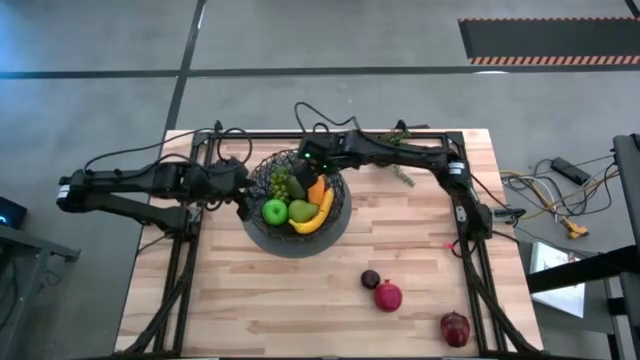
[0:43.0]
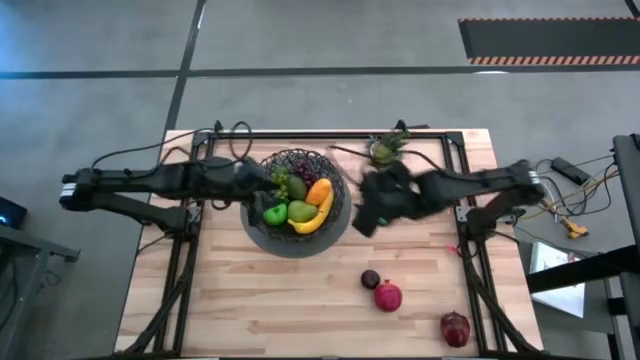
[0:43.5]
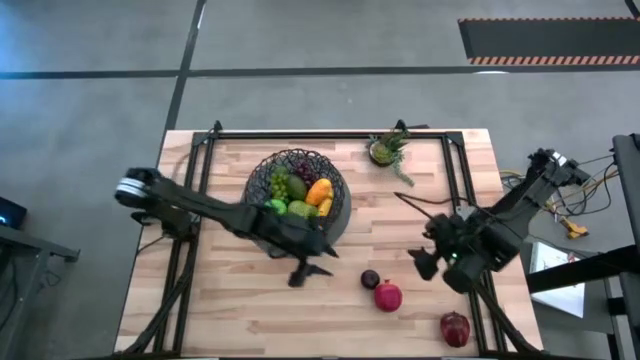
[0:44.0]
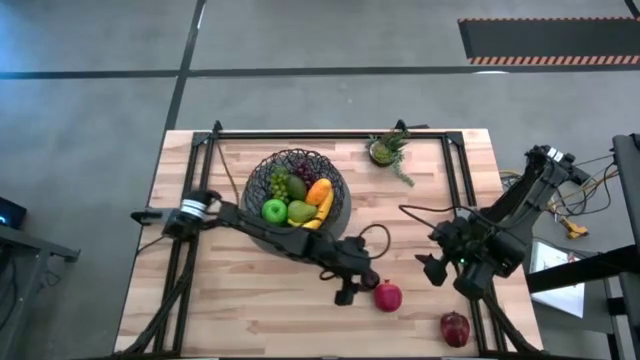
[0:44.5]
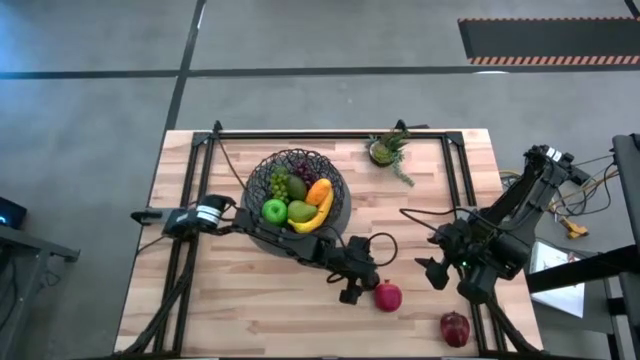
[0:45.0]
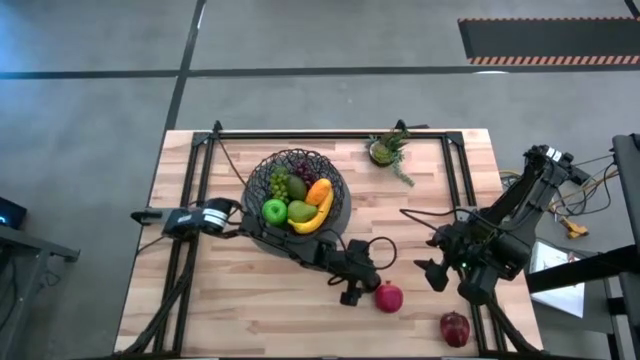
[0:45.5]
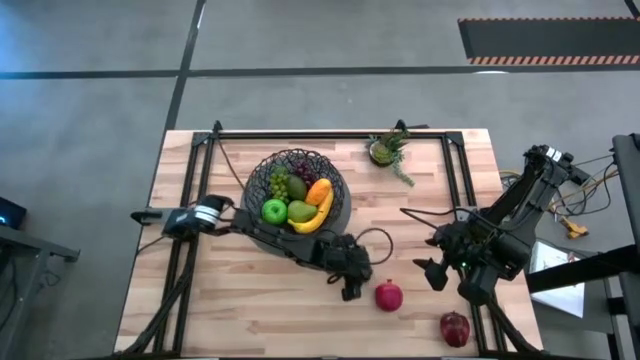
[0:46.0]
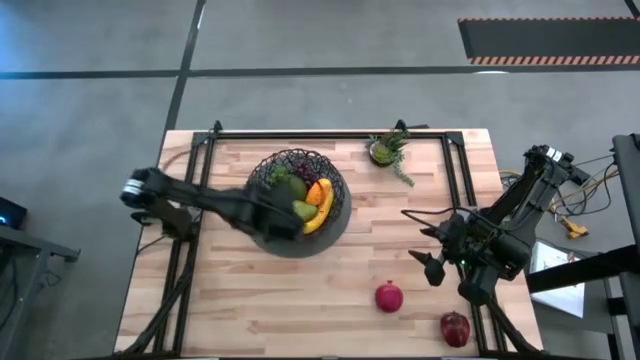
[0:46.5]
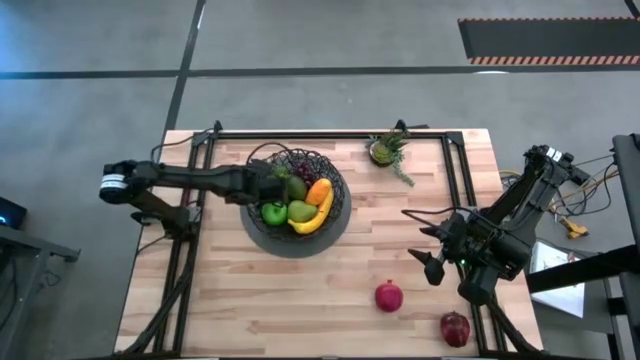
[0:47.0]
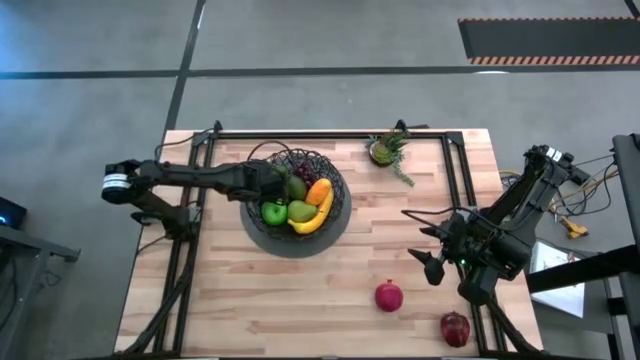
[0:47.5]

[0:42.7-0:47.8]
Task: Build produce basket
Put the plum into the basket

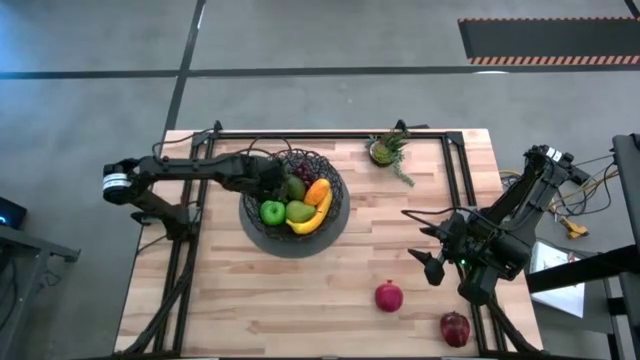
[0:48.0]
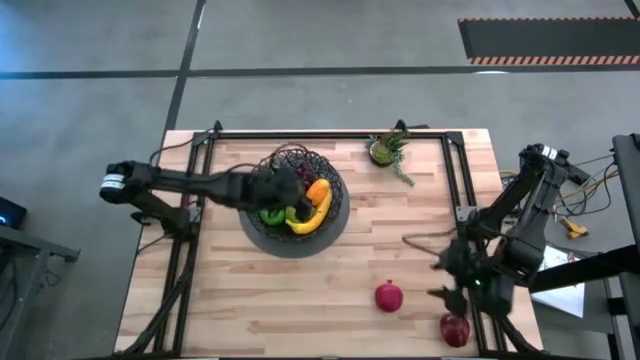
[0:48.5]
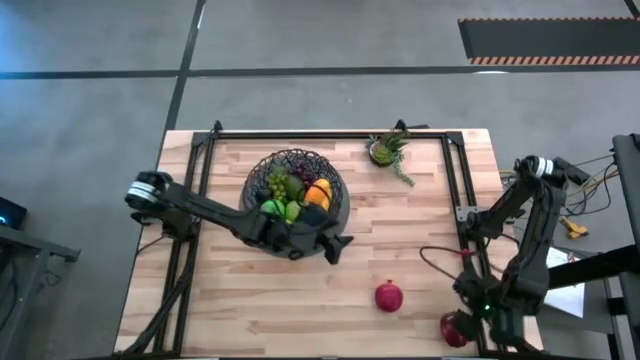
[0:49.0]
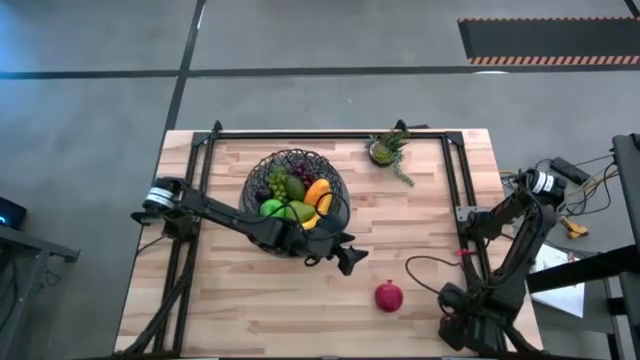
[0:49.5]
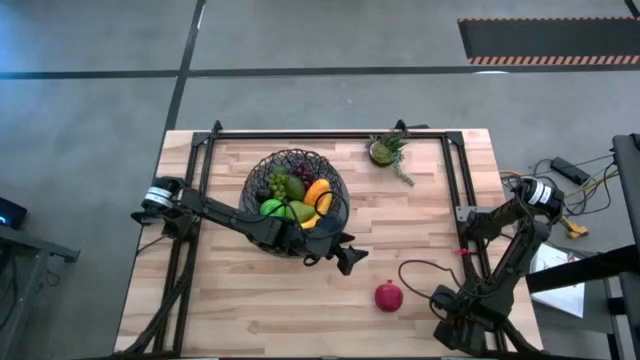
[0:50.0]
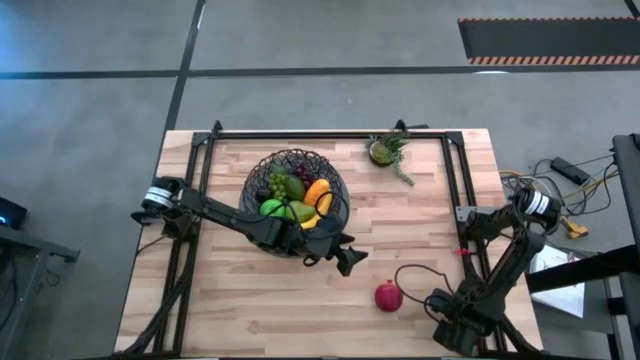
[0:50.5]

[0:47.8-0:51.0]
Put the red apple into the basket

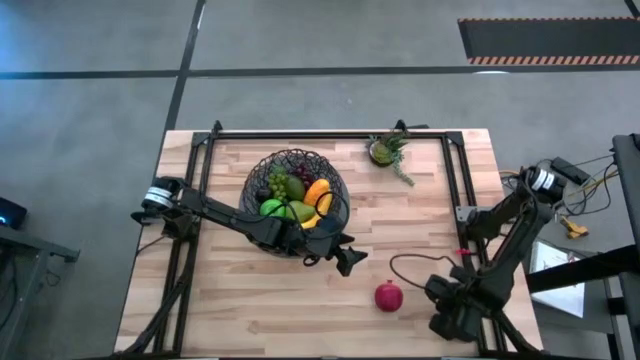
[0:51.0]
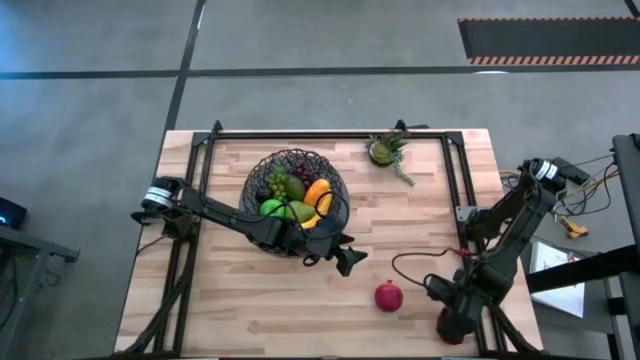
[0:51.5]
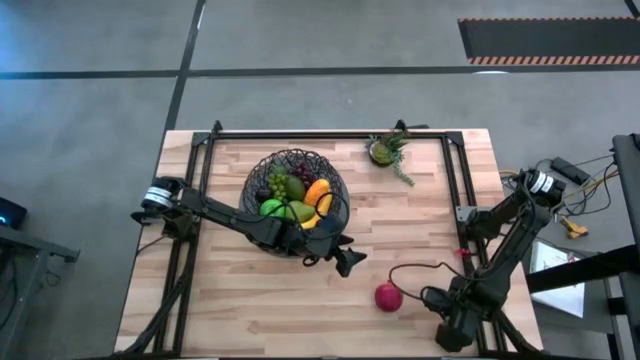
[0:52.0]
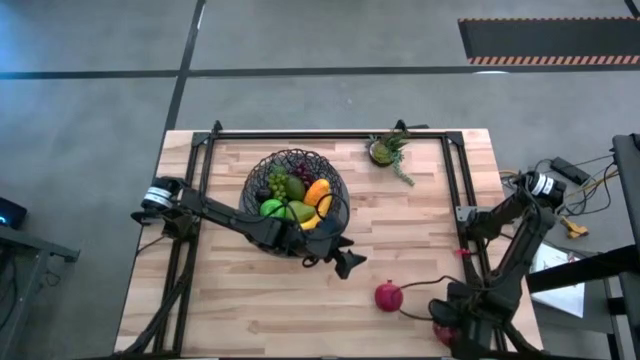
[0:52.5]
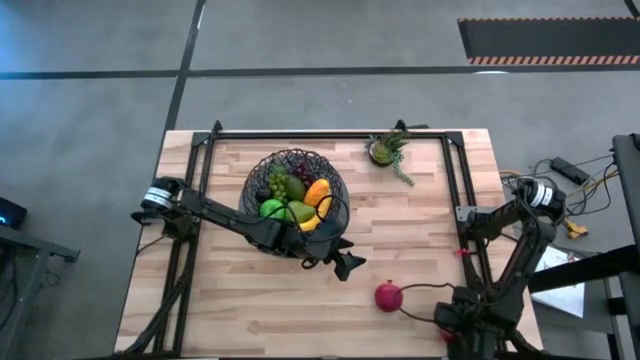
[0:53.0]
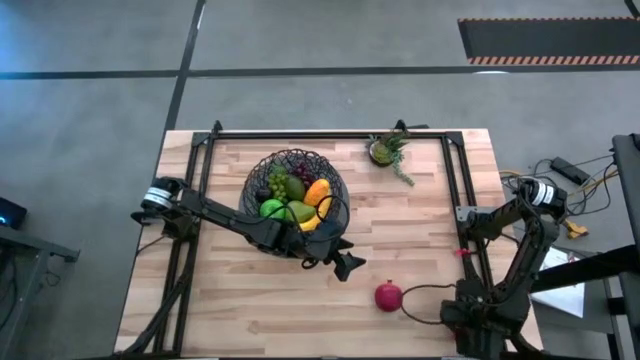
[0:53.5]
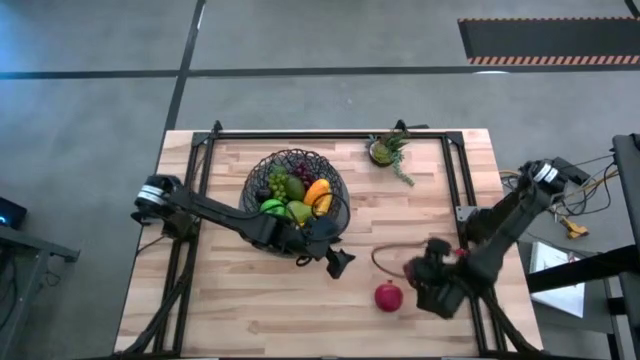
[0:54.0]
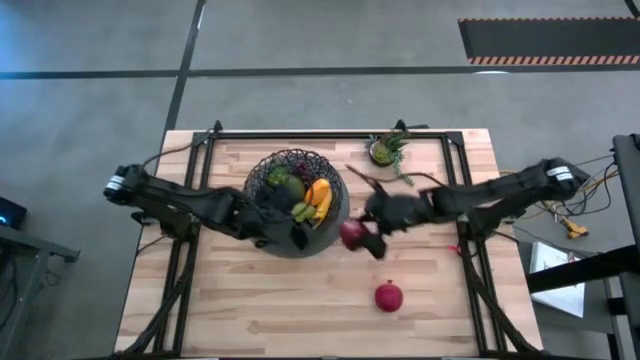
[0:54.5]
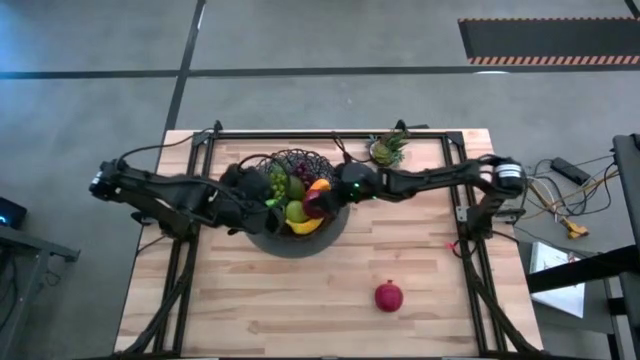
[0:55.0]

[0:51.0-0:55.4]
Put the apple into the basket

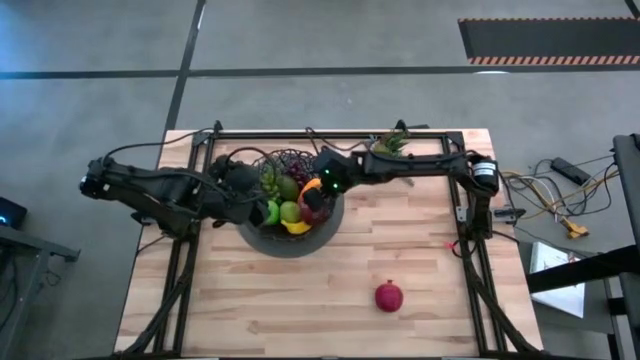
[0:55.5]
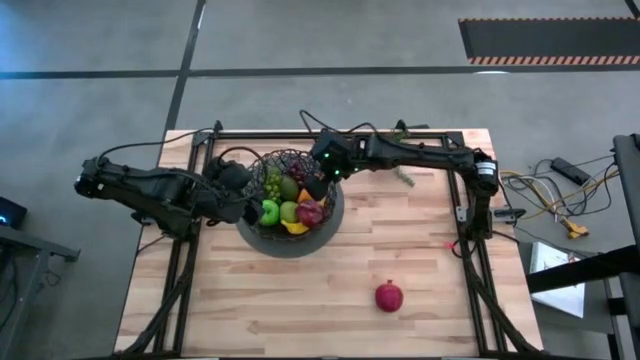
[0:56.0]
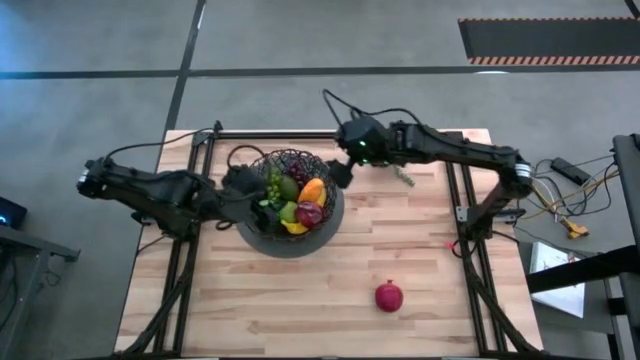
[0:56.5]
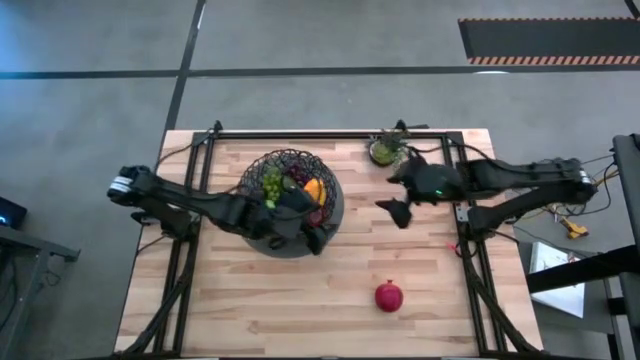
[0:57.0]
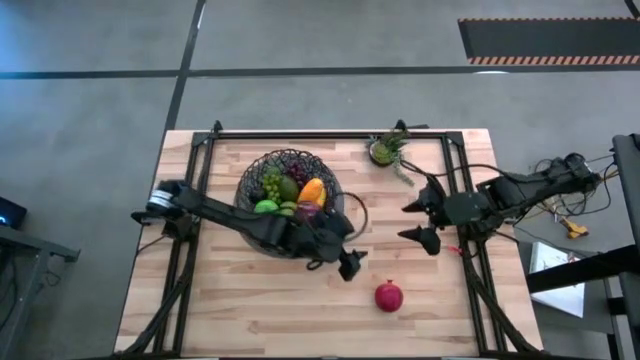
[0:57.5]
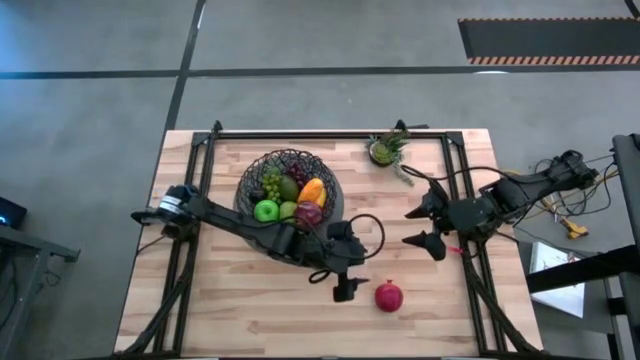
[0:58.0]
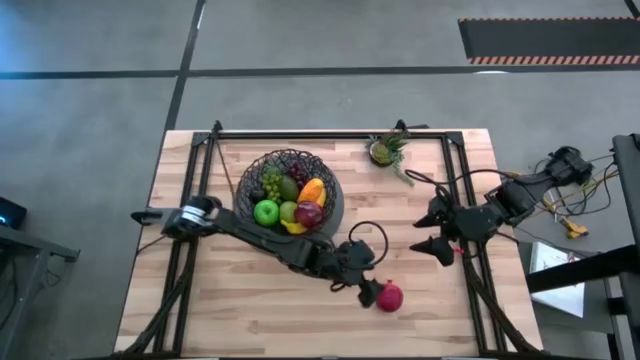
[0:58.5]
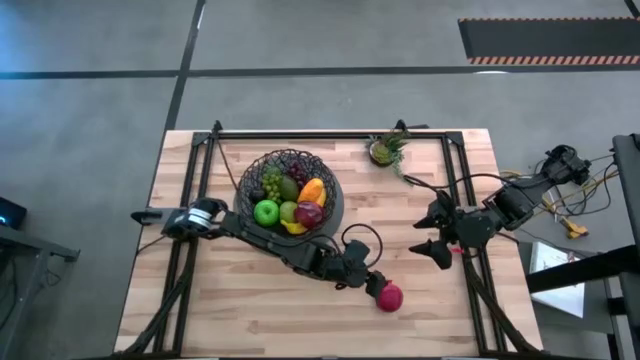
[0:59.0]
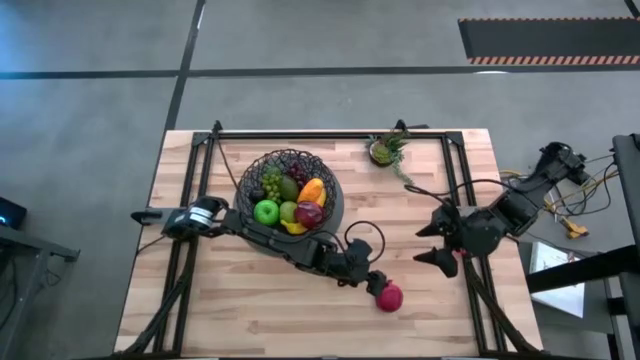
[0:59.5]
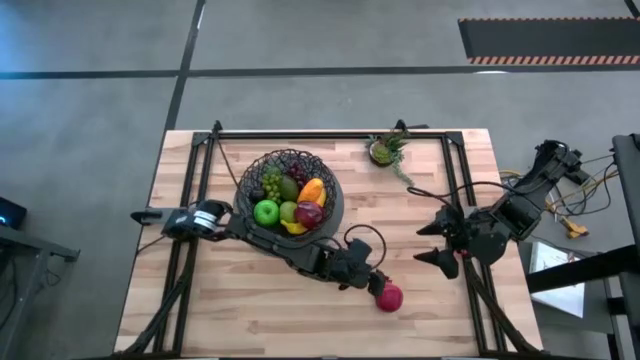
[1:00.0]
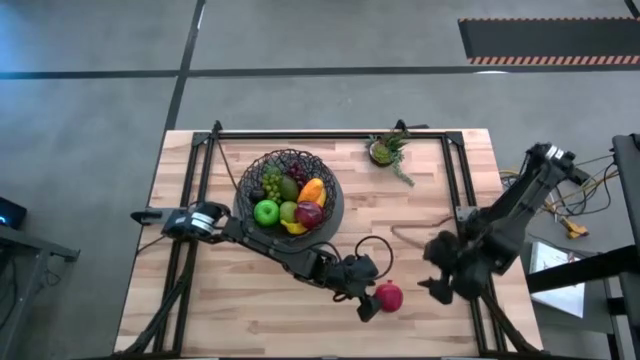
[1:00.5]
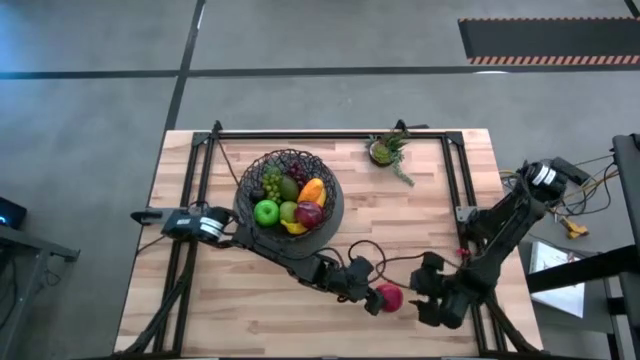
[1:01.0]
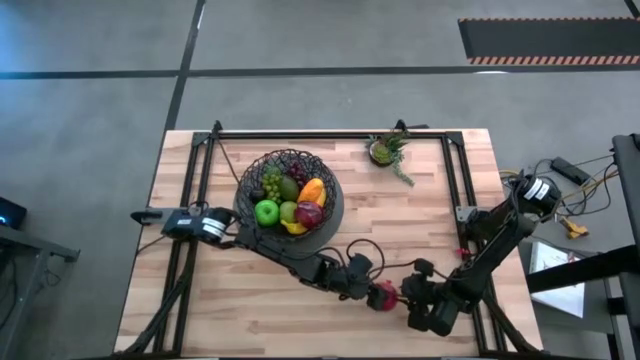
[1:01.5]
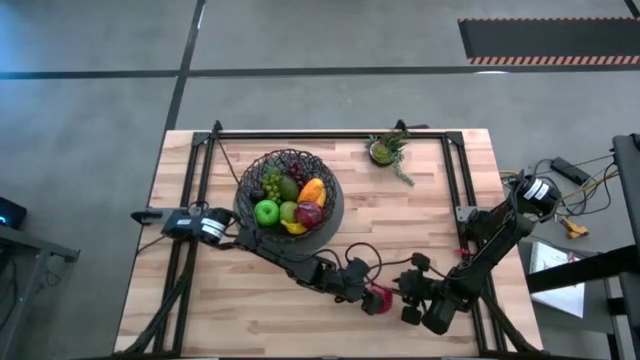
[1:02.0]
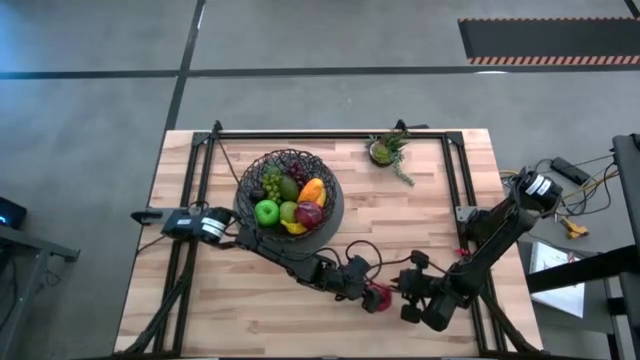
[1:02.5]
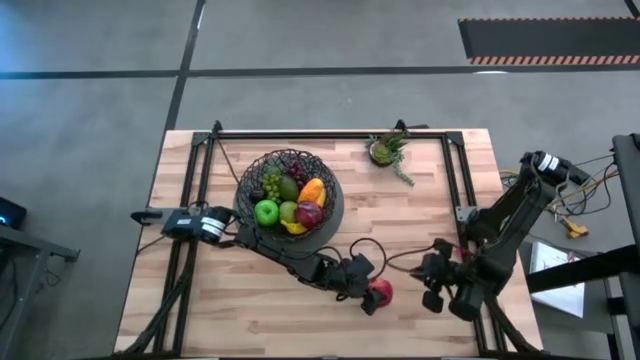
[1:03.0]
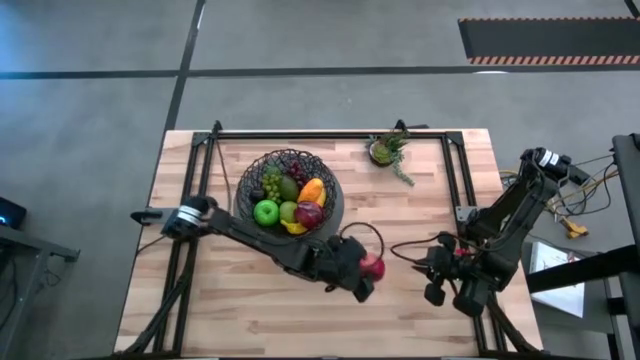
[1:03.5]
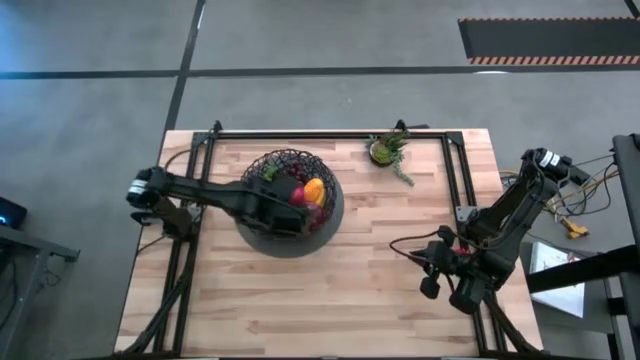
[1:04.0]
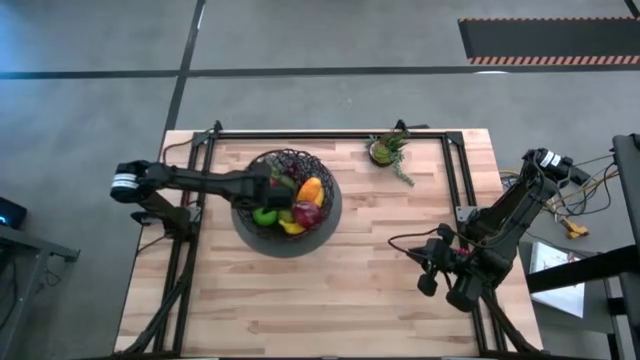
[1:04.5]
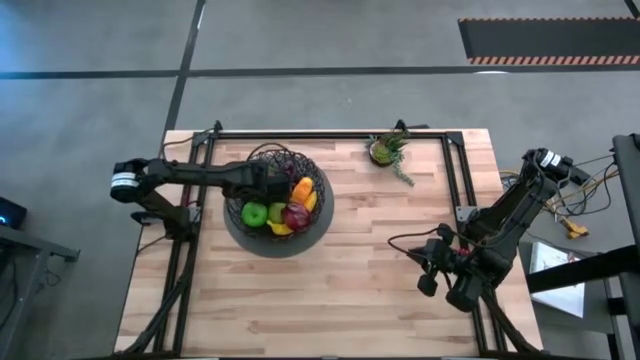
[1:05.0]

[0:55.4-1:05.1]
Put the pomegranate into the basket
